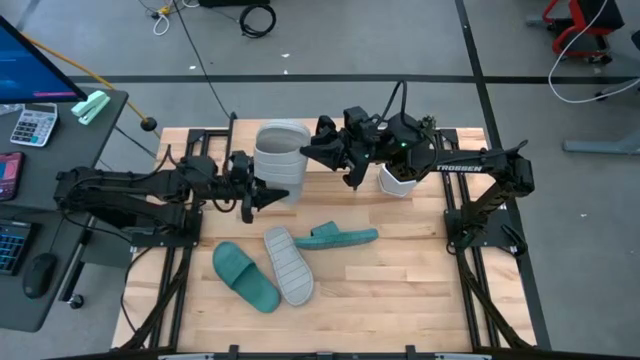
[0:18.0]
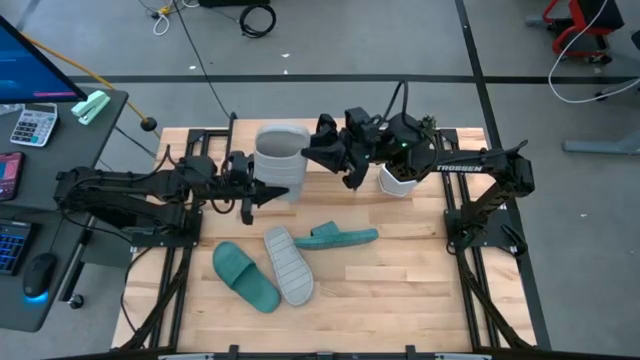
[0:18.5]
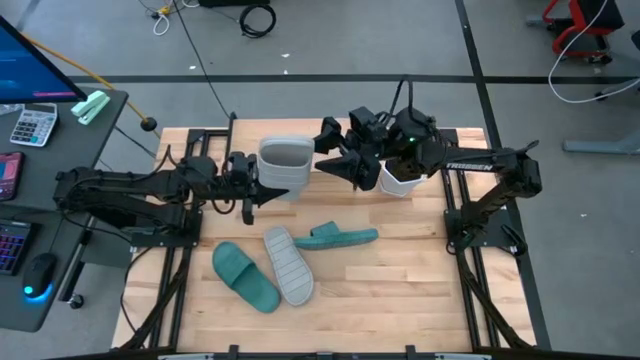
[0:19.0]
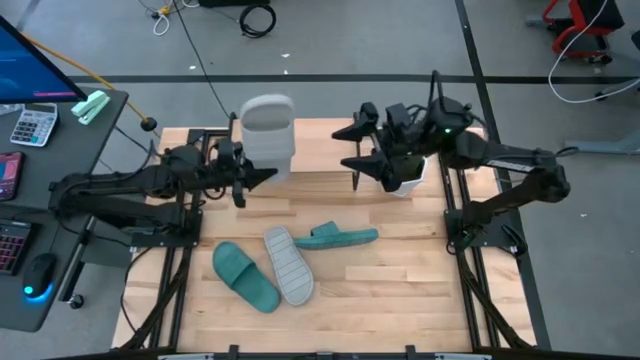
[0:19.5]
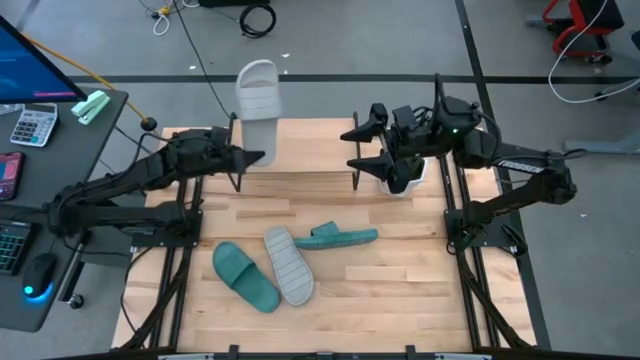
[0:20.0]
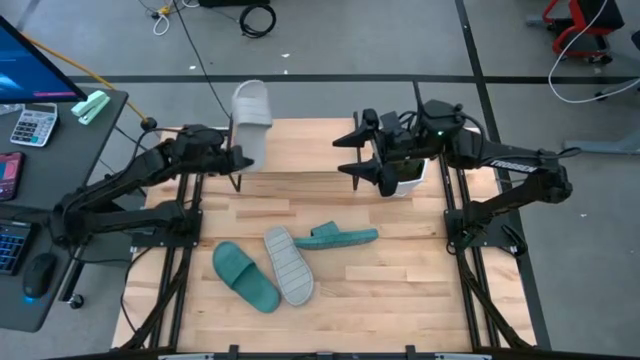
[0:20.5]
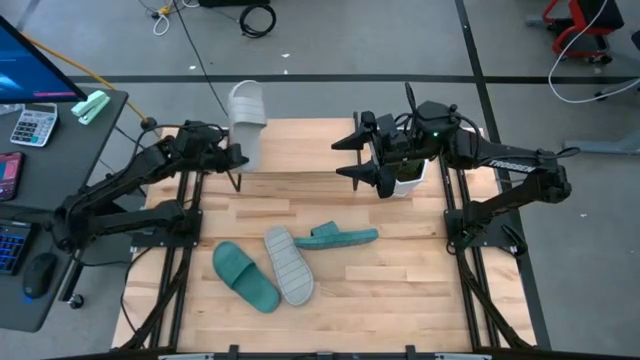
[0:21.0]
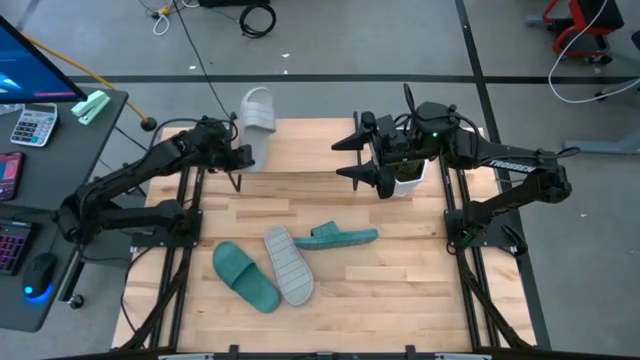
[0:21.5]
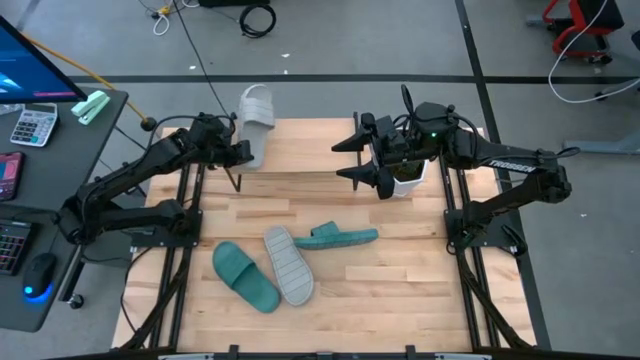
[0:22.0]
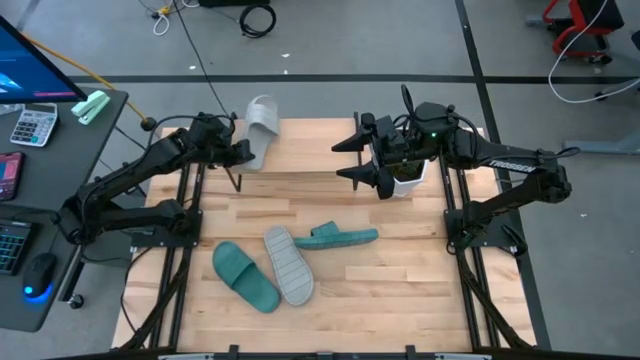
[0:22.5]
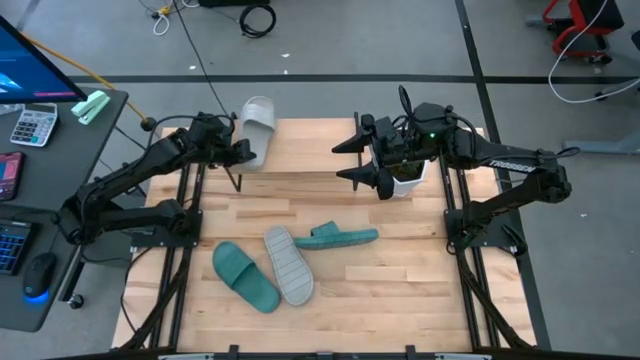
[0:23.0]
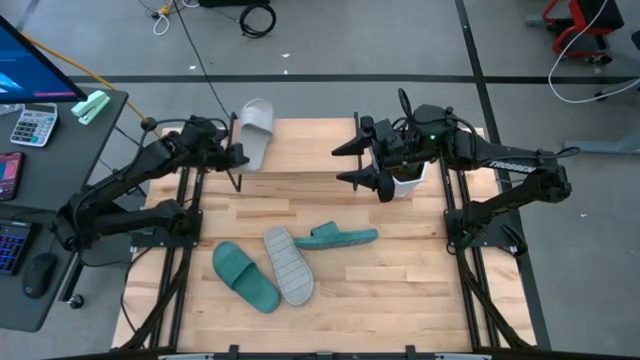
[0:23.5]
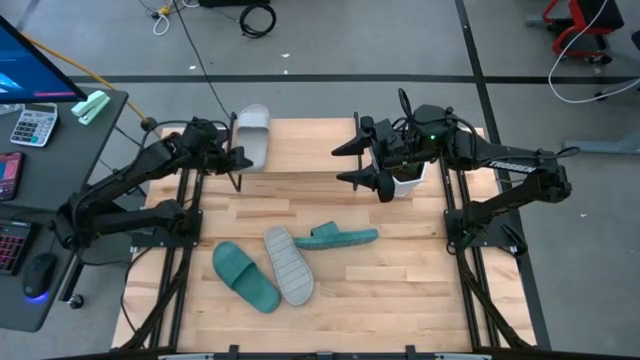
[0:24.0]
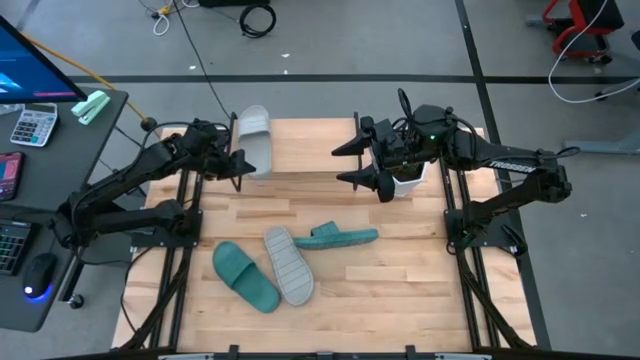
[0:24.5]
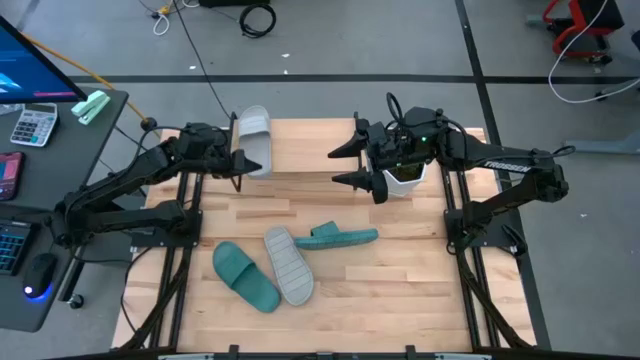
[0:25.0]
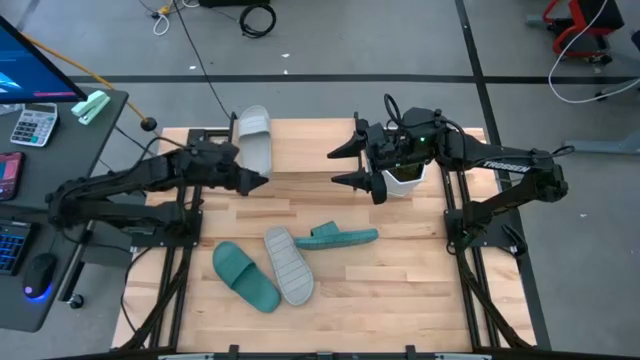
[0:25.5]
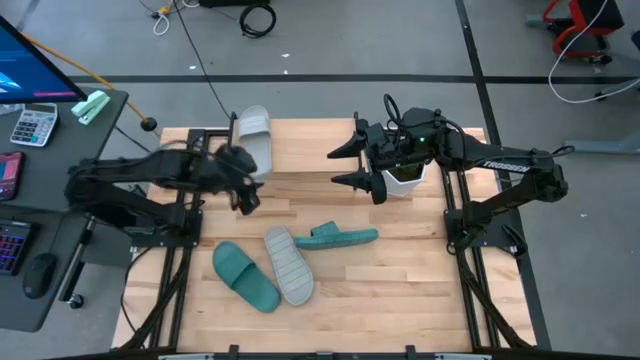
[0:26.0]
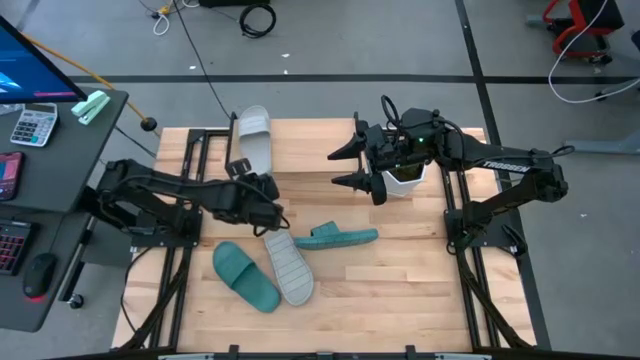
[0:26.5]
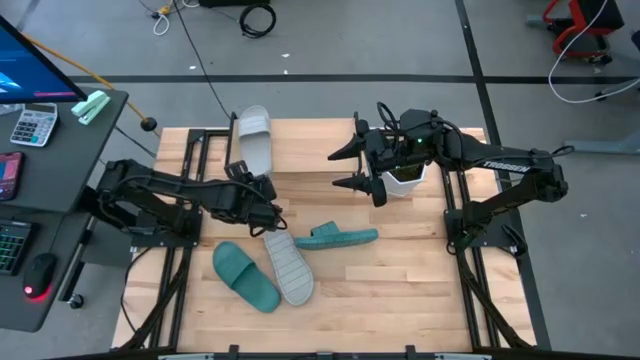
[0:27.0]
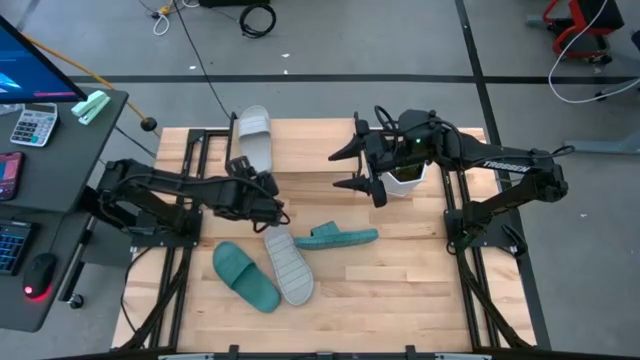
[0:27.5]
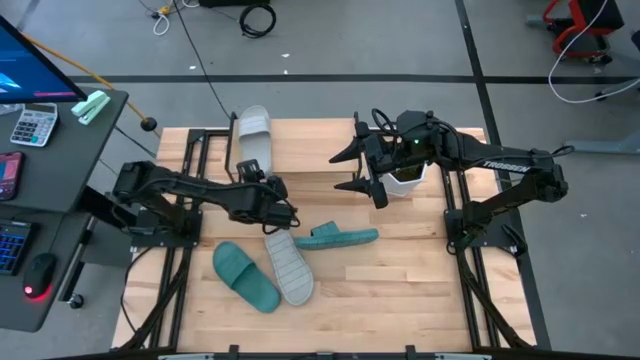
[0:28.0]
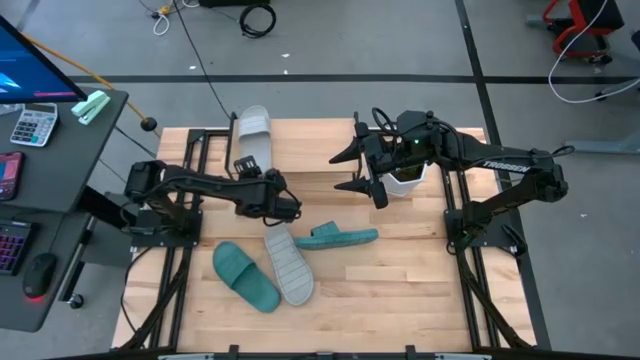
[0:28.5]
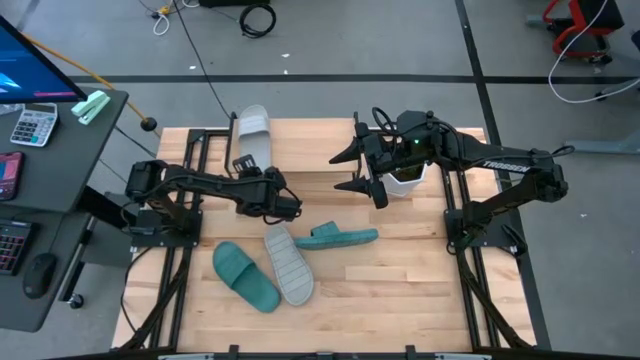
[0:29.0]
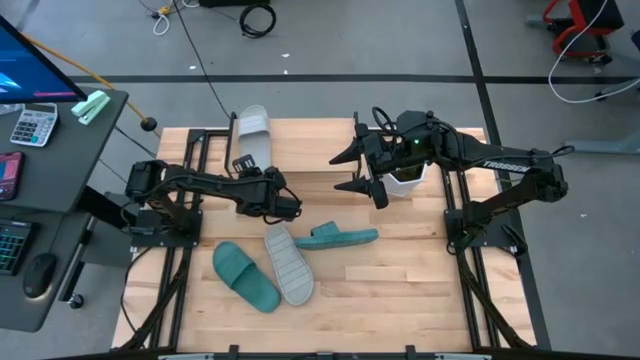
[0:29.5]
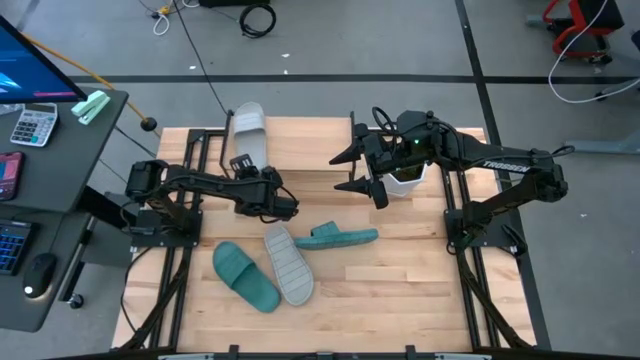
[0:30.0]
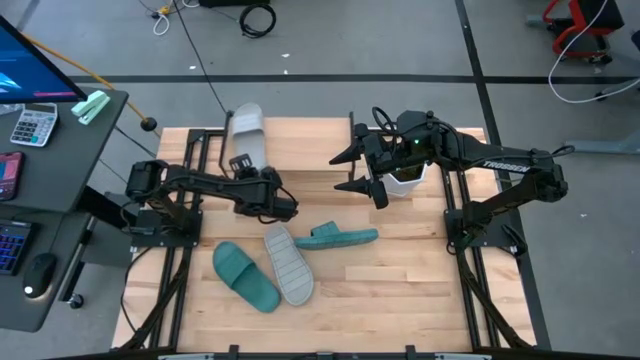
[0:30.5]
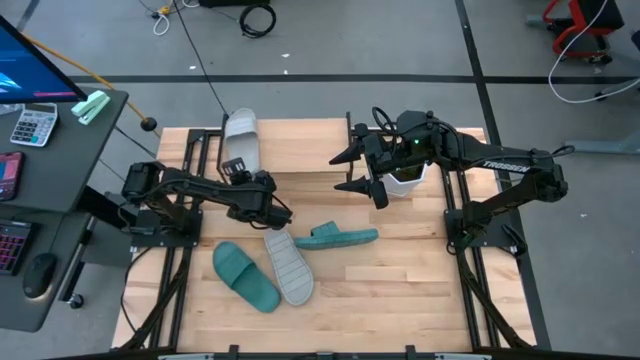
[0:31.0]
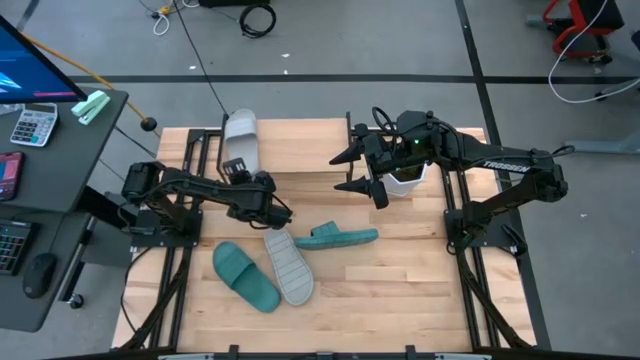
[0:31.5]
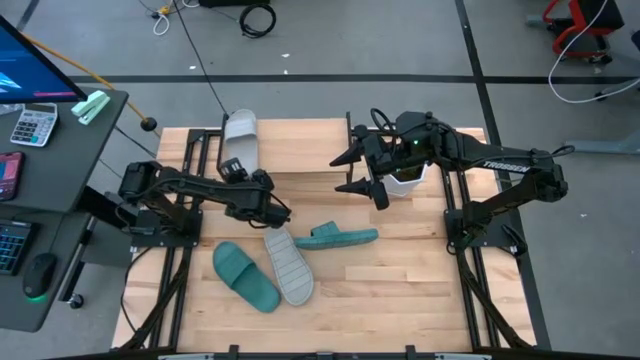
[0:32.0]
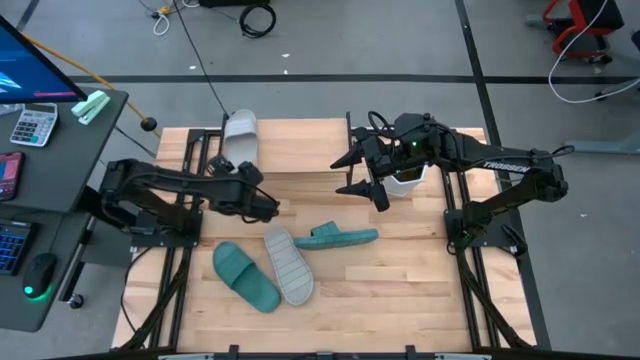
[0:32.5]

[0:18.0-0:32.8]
Task: Pick and place slides into the shelf
Put the right gray slipper on the shelf

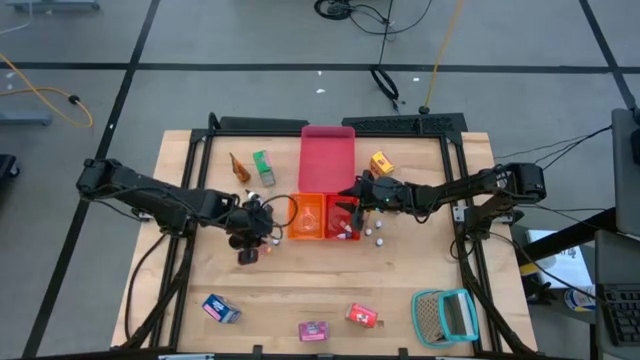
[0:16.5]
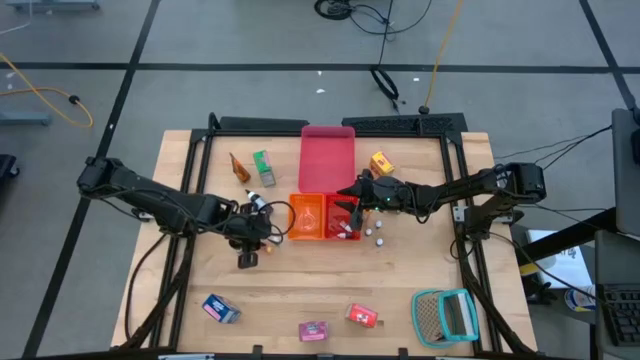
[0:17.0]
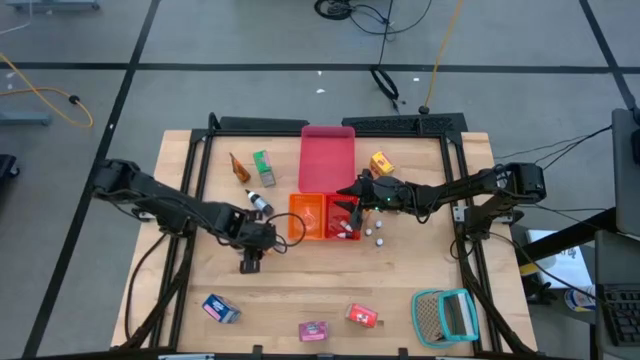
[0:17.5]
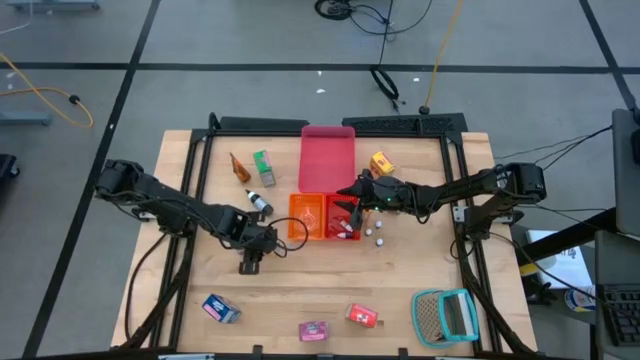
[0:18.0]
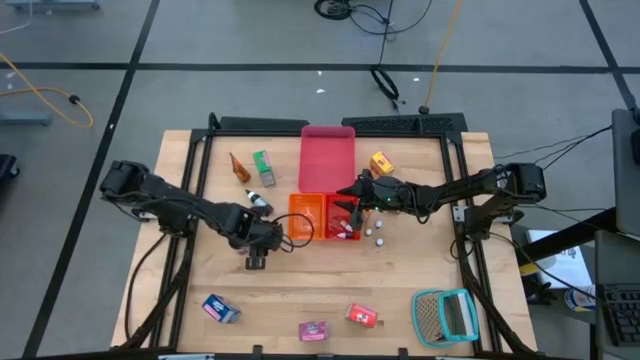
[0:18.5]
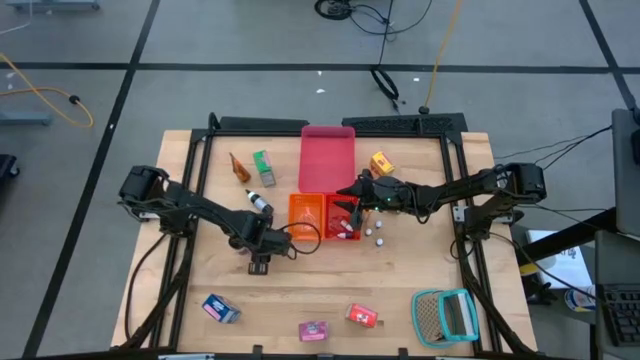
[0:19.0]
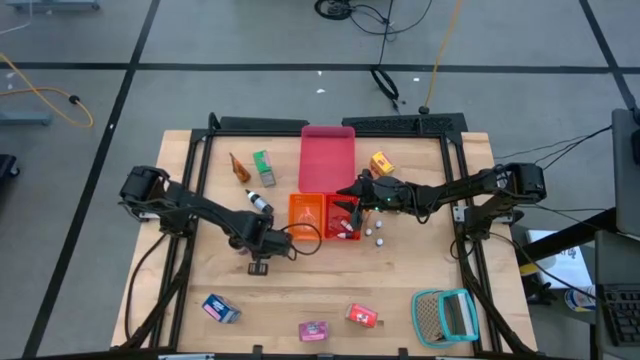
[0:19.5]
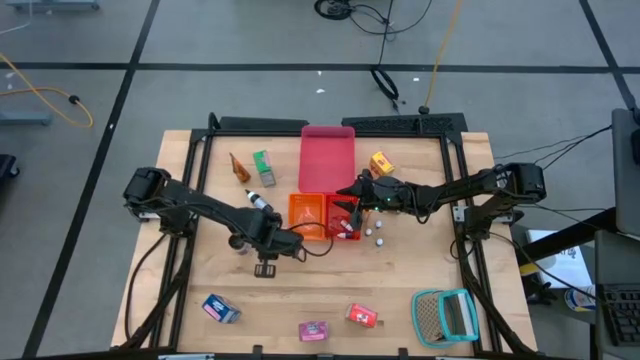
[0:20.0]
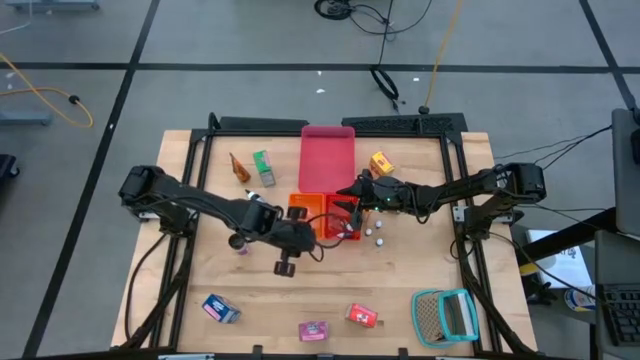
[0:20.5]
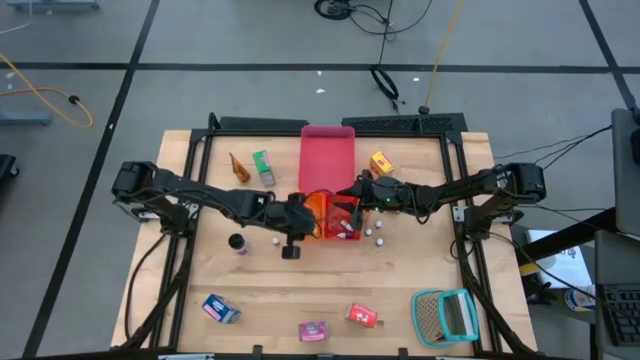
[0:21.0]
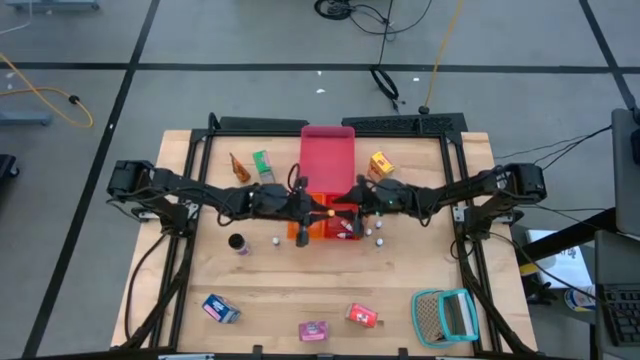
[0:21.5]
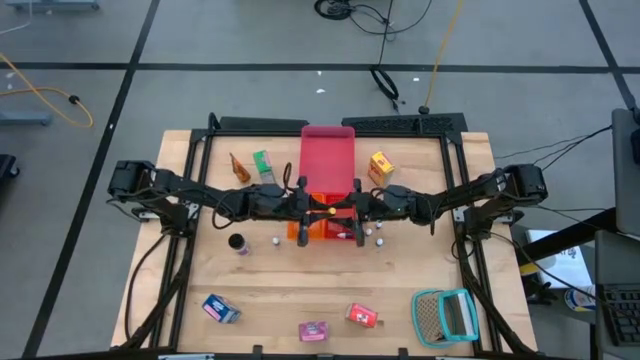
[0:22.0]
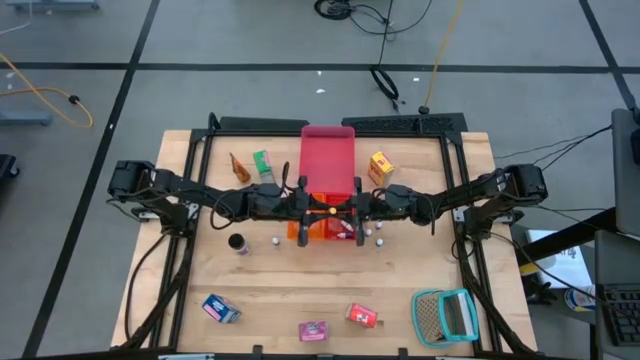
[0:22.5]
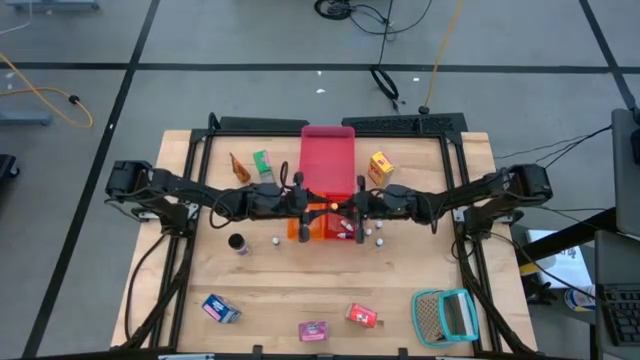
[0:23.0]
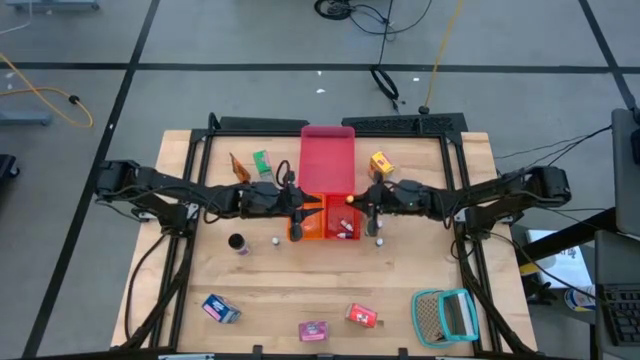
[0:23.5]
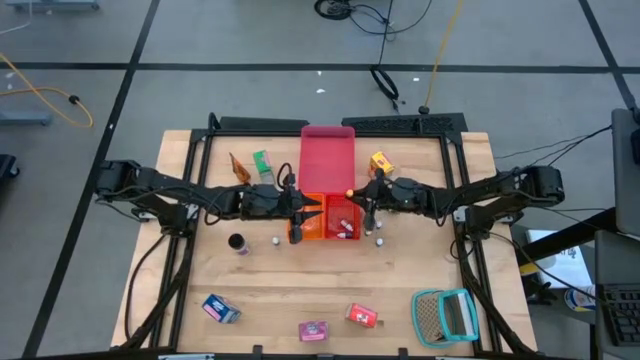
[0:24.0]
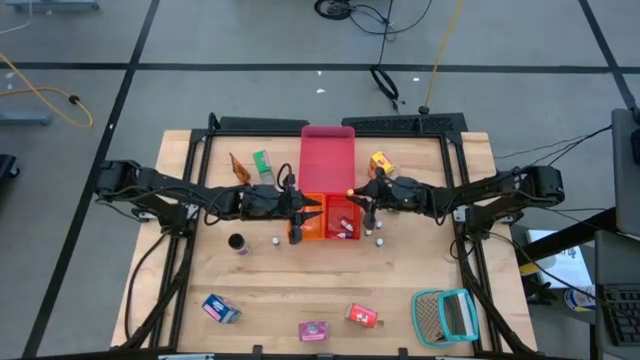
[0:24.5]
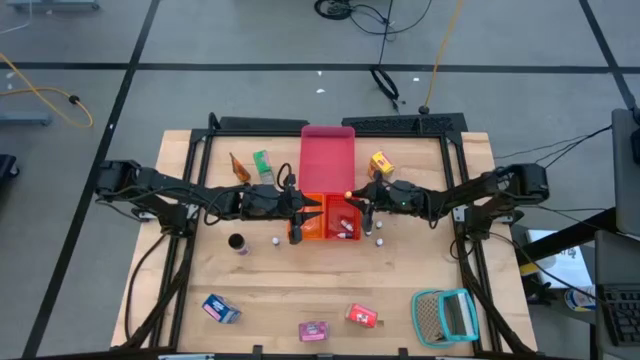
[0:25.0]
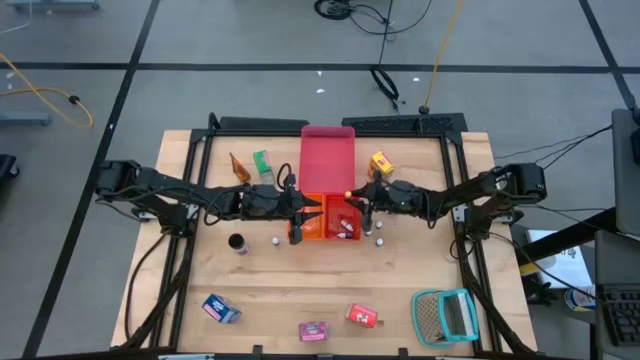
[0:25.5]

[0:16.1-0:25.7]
Task: Pick & Place Kitchen Items
Put the large yellow food coloring bottle into the red basket
